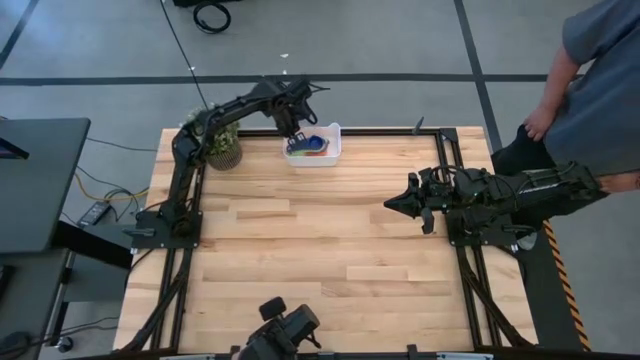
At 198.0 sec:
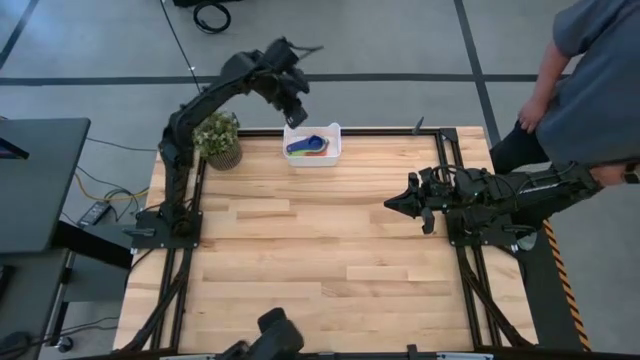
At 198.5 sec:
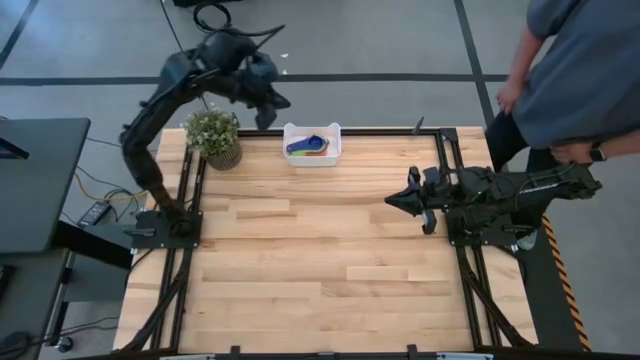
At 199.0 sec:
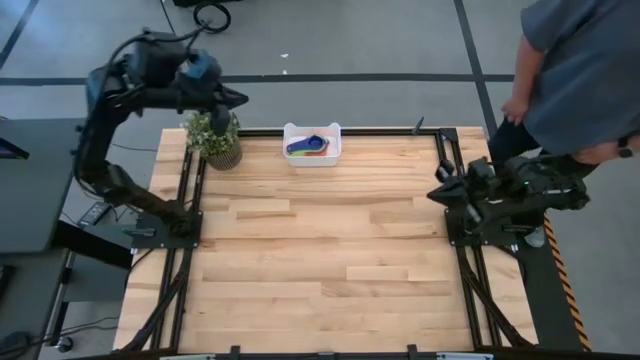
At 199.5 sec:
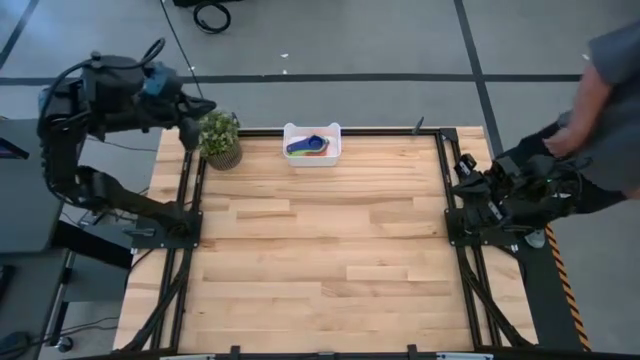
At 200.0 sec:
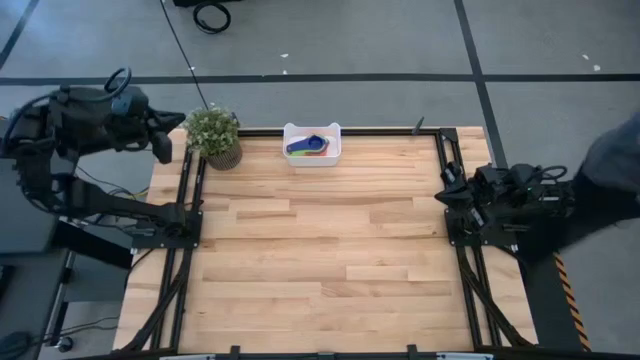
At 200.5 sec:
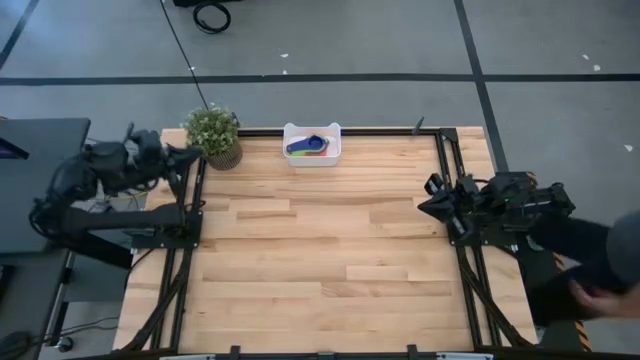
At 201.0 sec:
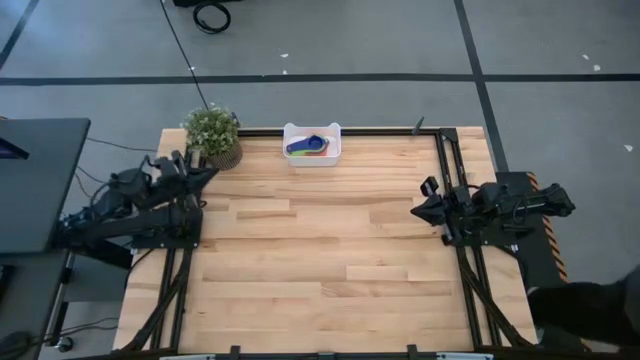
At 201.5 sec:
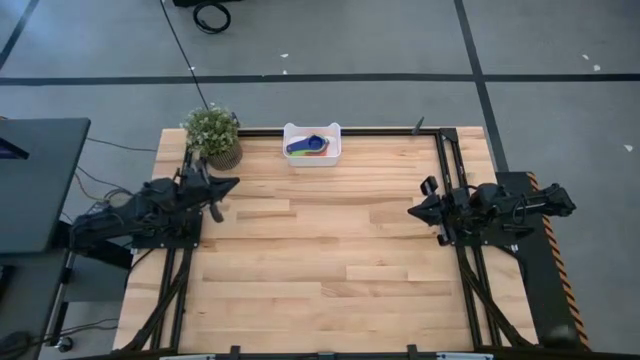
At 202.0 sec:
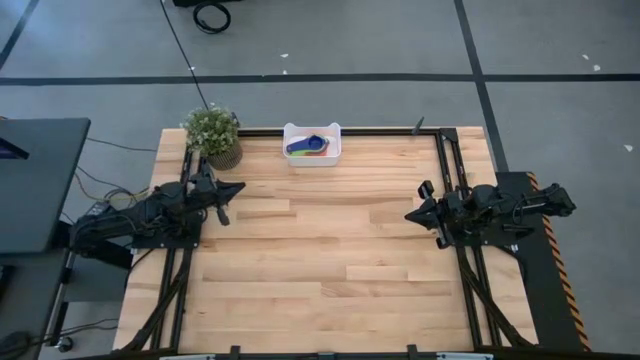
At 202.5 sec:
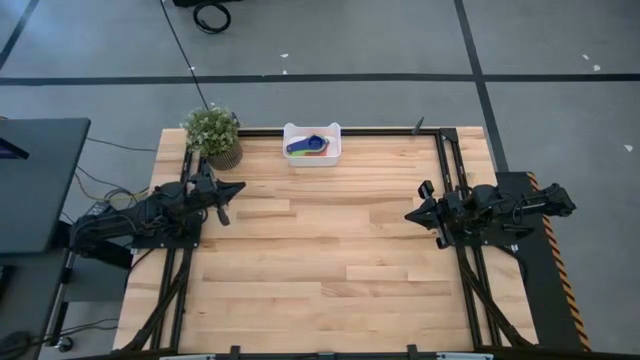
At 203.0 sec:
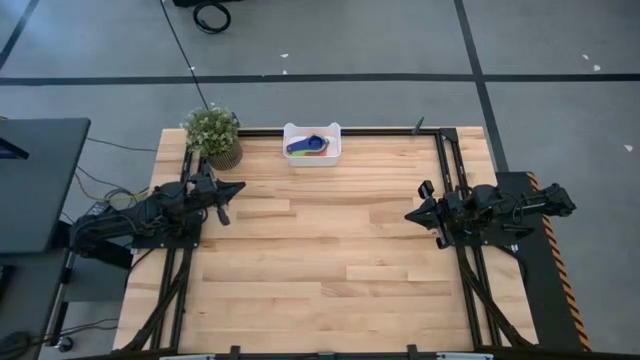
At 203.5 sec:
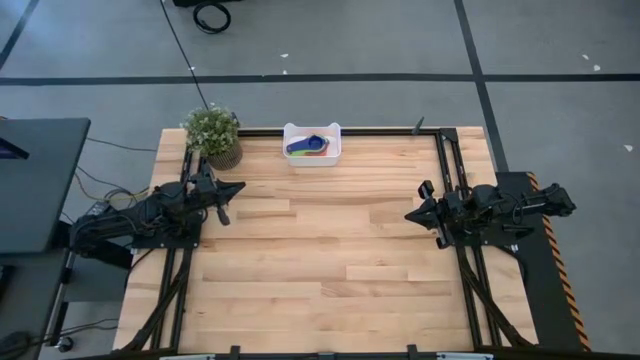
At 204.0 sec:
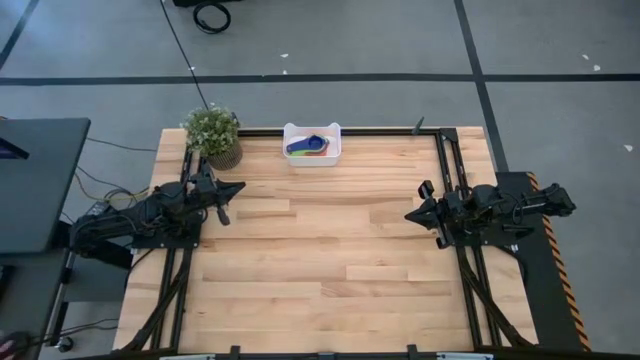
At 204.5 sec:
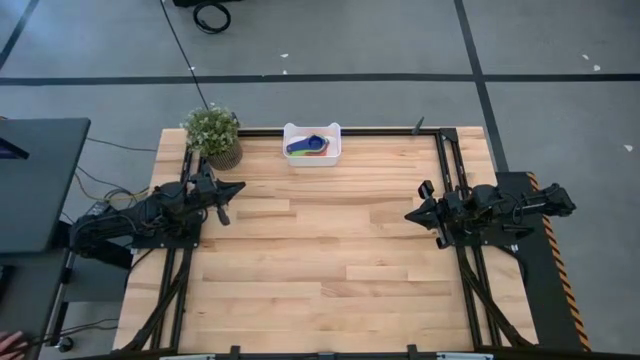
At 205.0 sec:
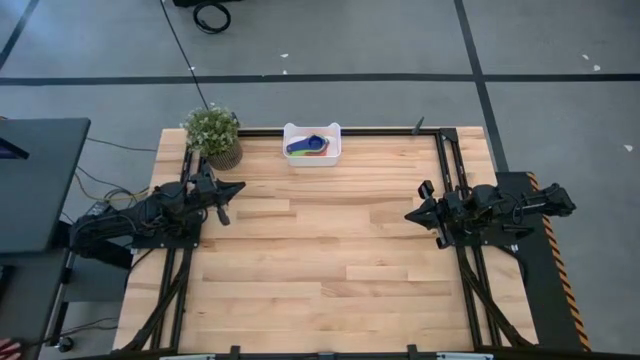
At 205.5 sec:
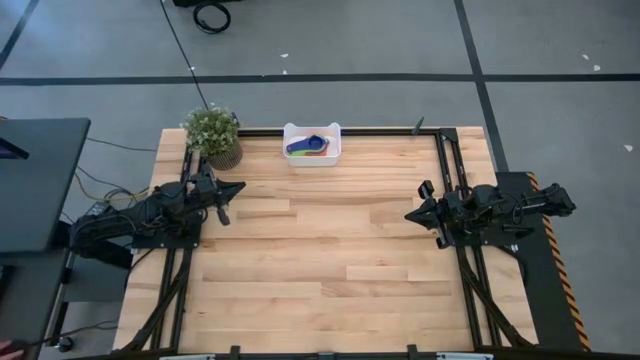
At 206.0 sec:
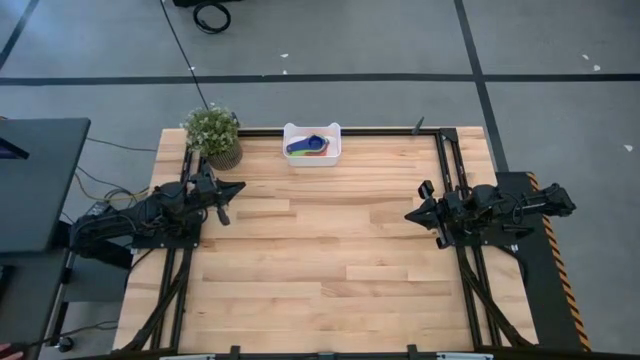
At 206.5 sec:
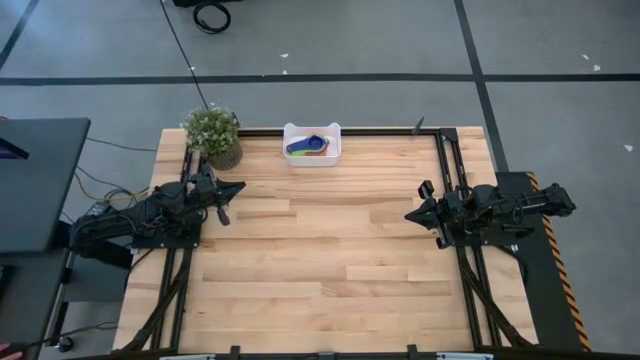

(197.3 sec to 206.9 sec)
Task: Nest measuring cups in basket
Return to Home Position

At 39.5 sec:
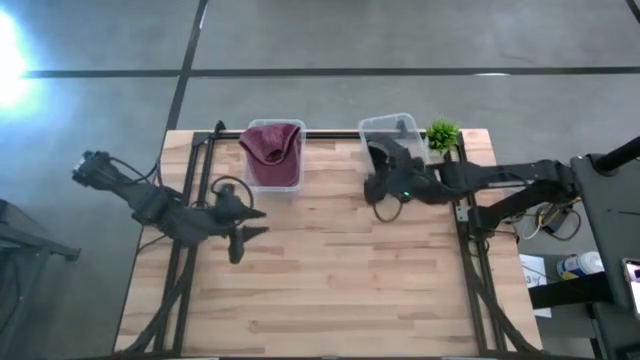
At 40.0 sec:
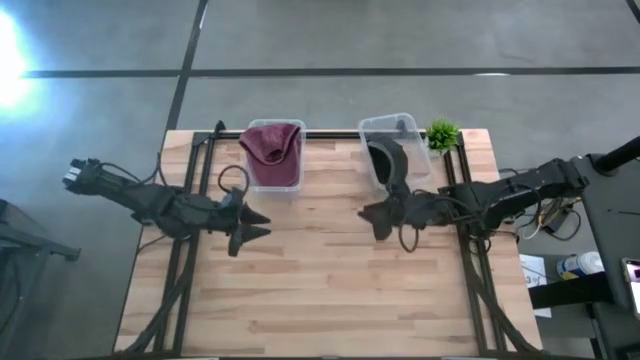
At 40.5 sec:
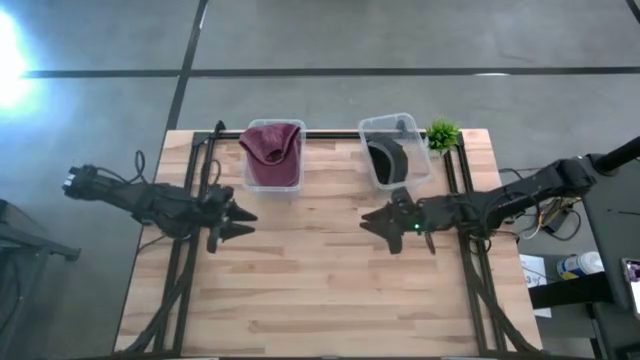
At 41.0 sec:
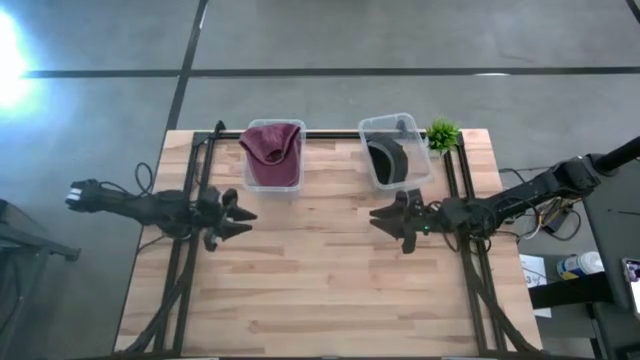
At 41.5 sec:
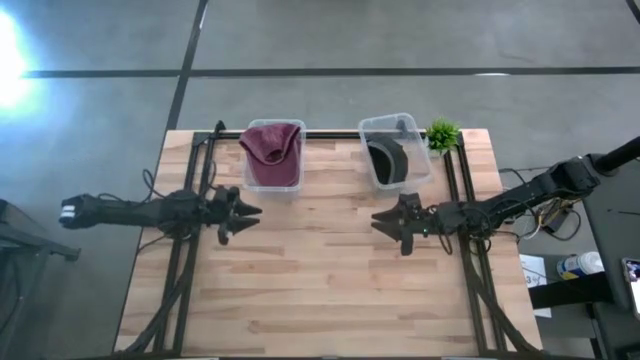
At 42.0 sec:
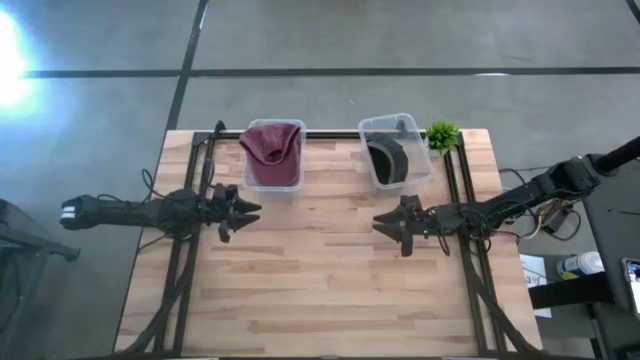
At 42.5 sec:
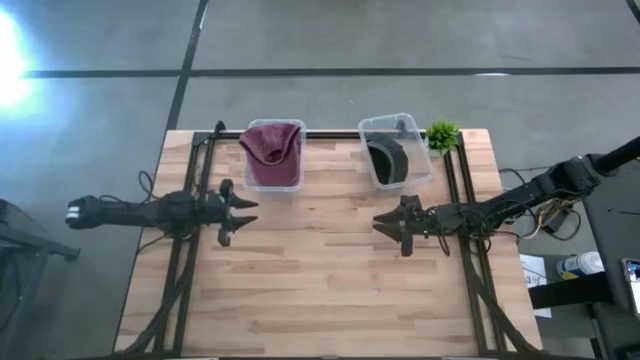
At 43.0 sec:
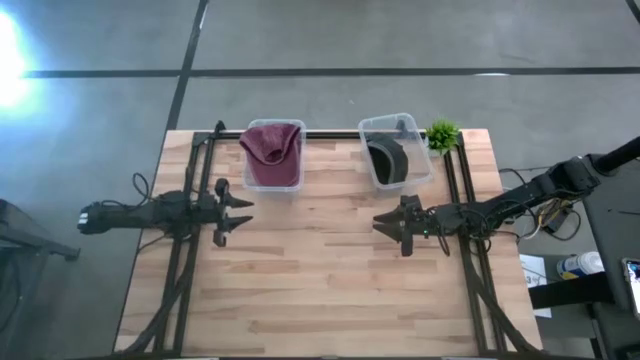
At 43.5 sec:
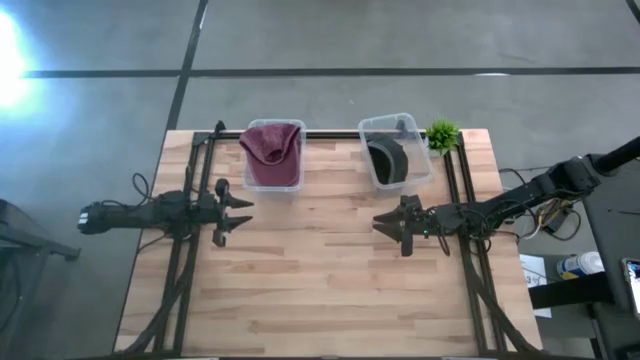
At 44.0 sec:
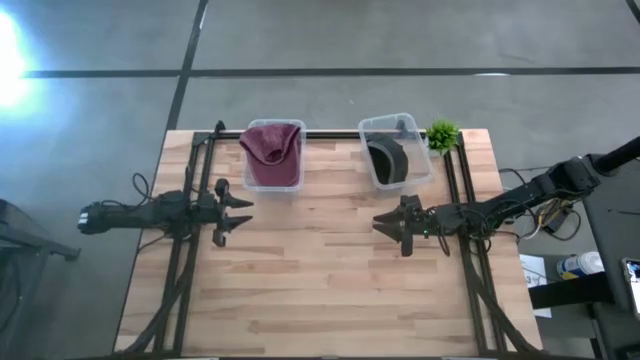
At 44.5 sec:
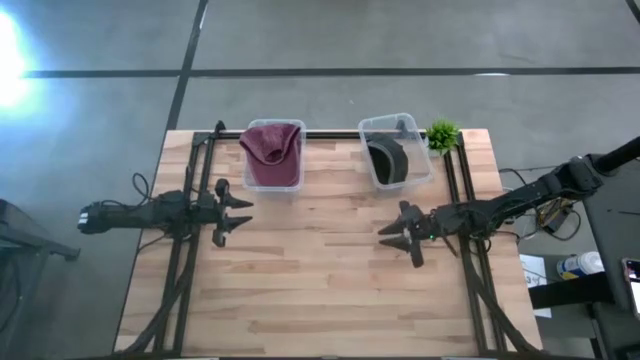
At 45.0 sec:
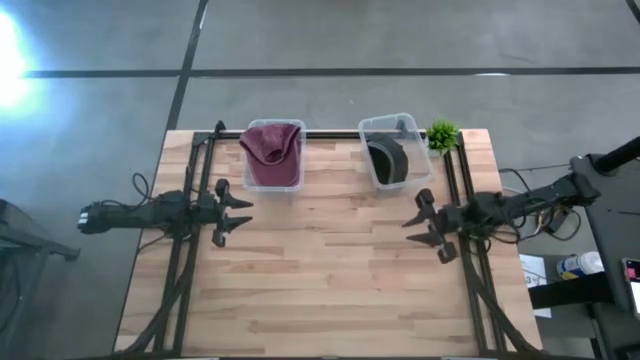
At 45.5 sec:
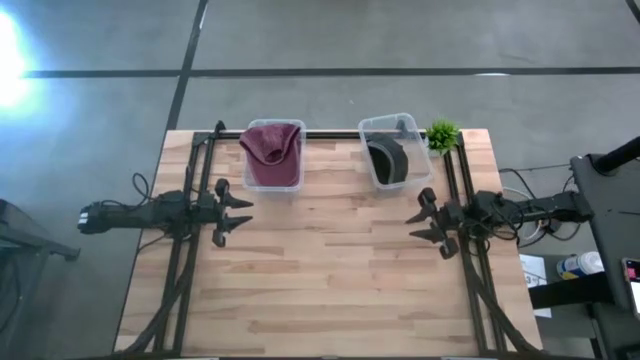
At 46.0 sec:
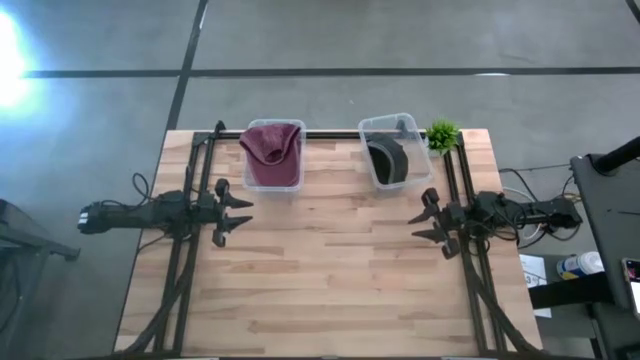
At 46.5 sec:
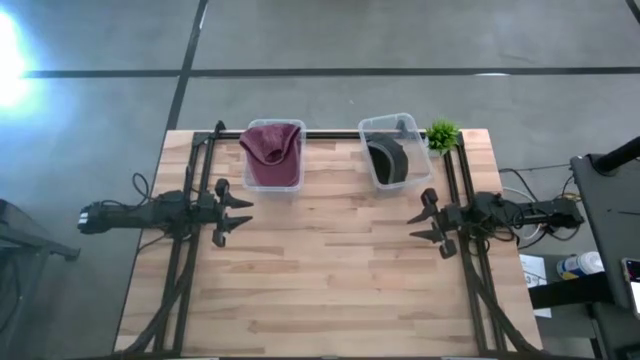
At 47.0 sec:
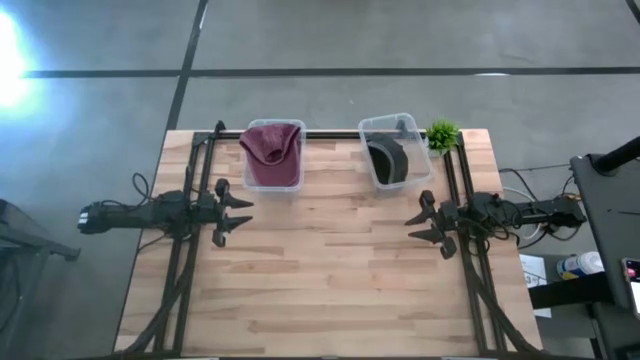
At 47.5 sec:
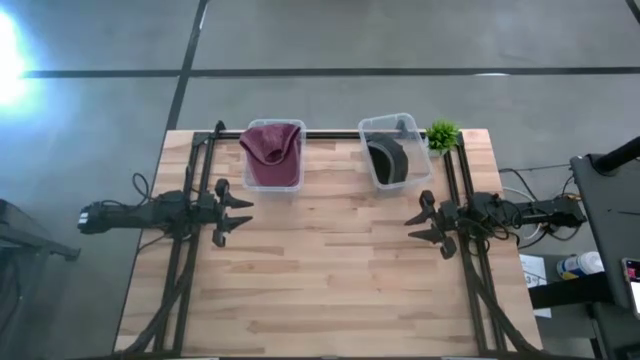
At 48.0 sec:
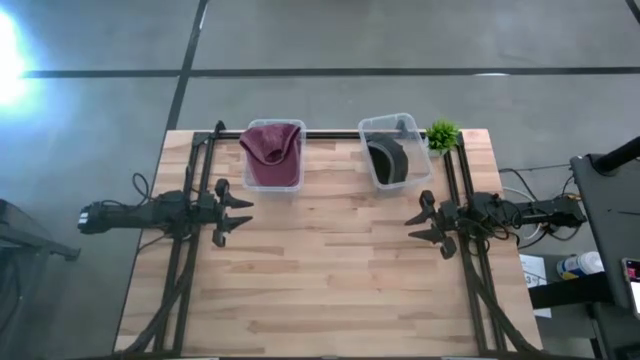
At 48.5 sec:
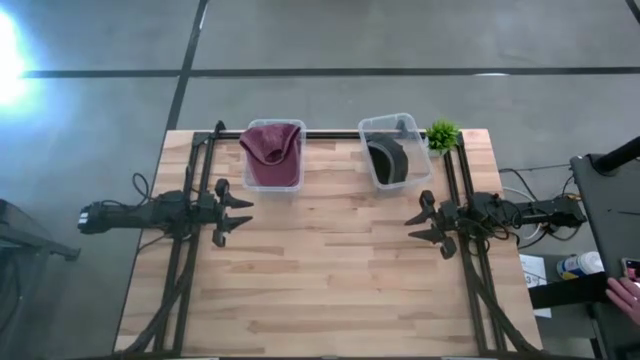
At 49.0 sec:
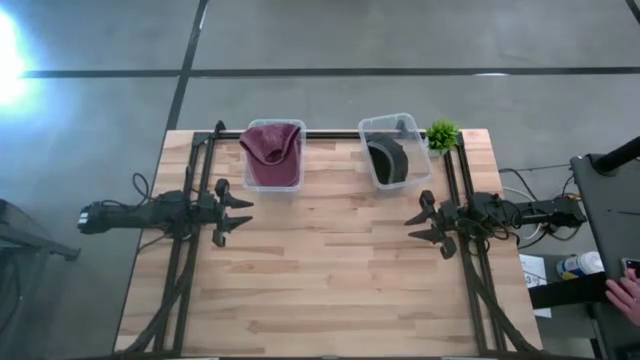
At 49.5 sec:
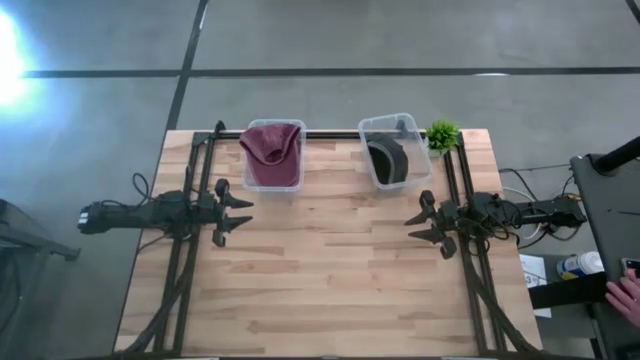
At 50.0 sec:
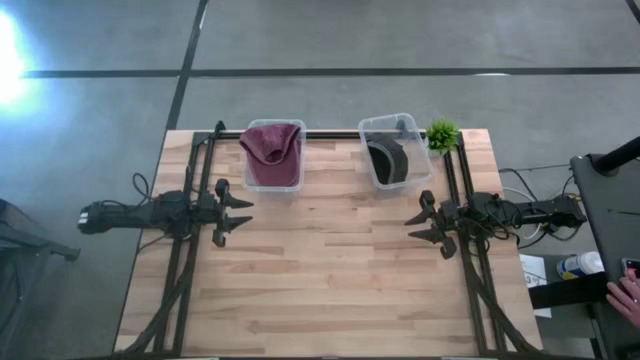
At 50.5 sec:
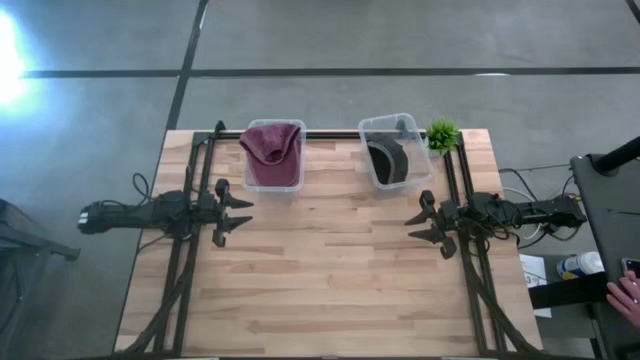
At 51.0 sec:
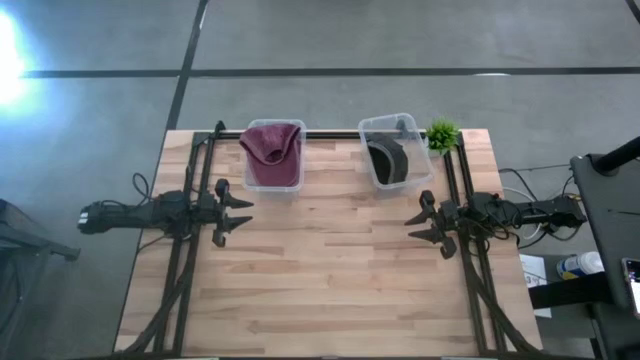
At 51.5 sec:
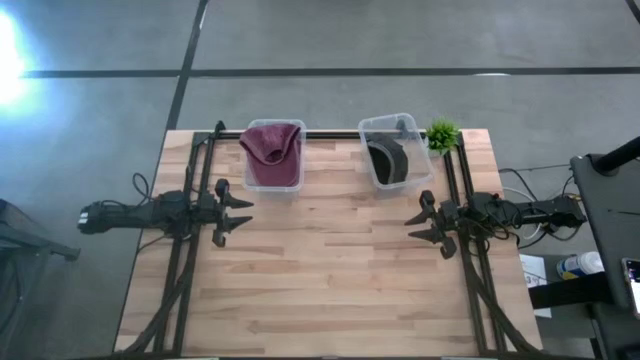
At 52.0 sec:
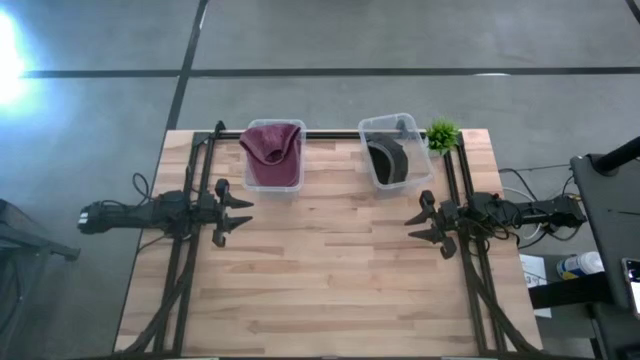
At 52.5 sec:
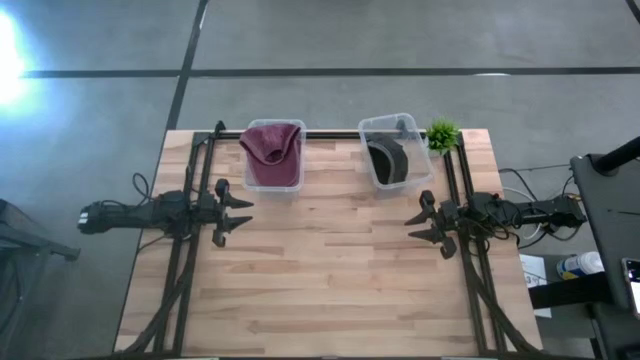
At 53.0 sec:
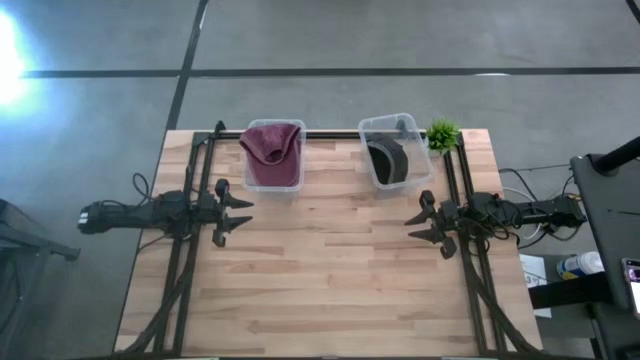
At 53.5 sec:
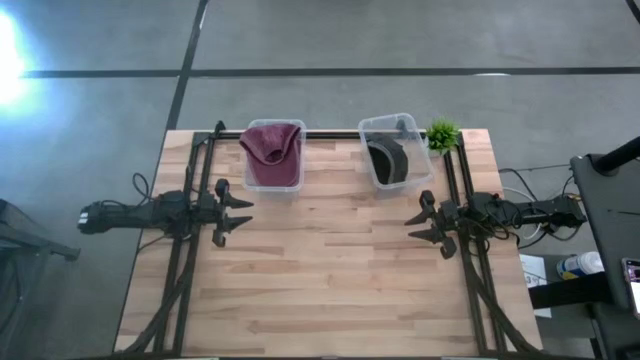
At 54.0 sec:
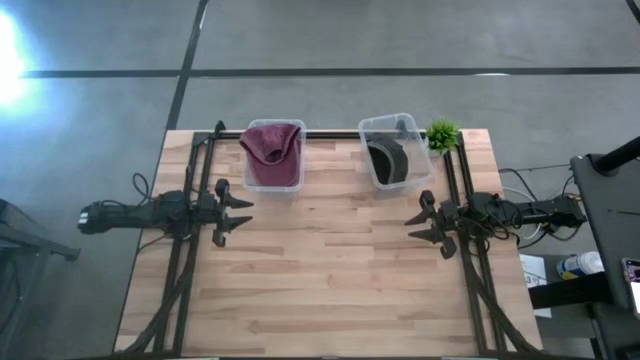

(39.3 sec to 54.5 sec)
Task: Pick & Place hat
Return to home position
